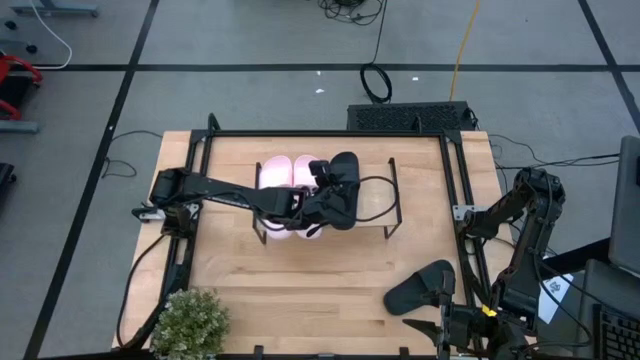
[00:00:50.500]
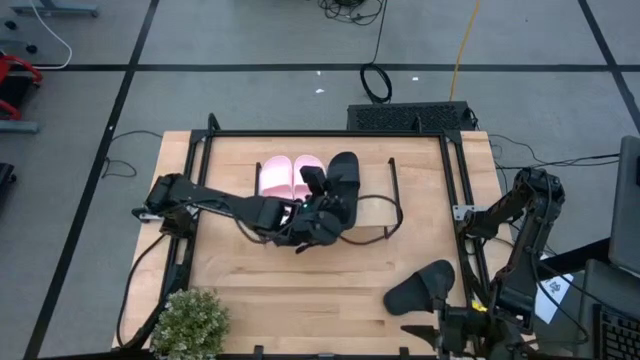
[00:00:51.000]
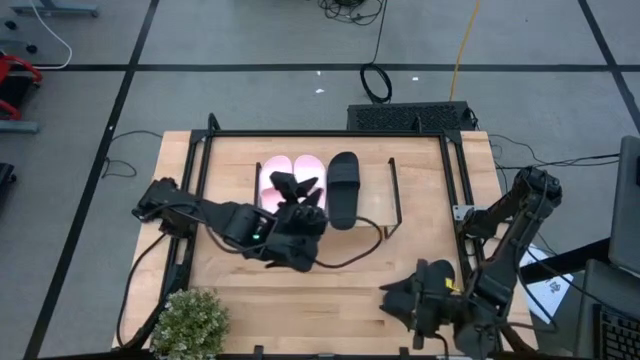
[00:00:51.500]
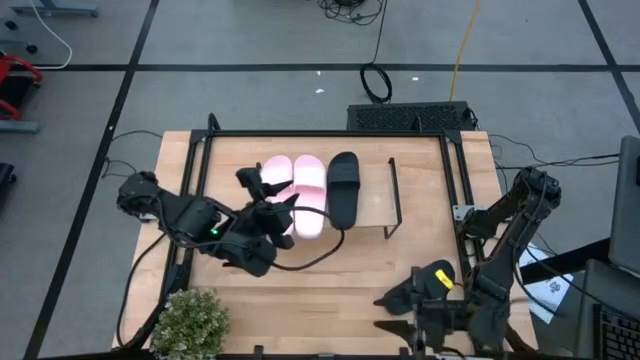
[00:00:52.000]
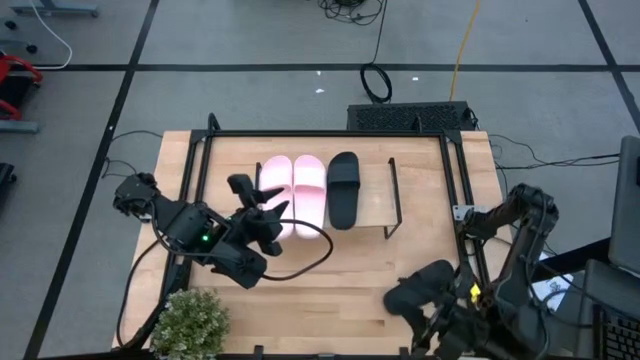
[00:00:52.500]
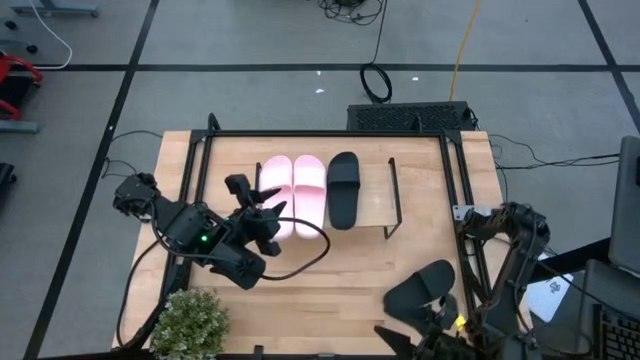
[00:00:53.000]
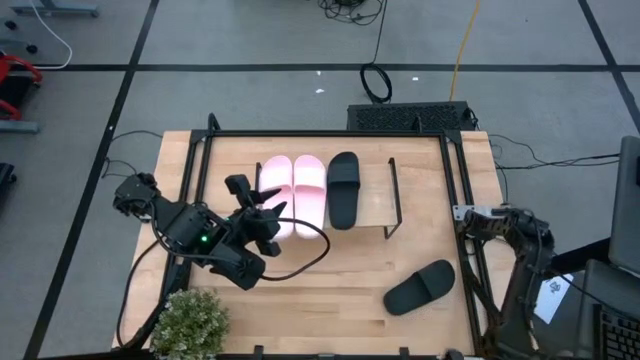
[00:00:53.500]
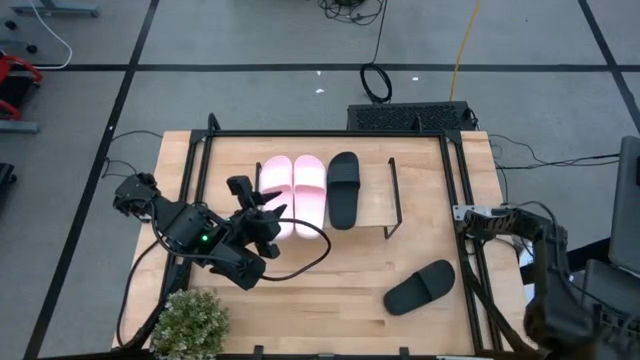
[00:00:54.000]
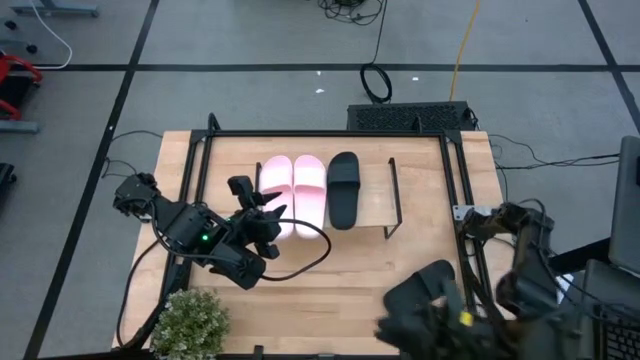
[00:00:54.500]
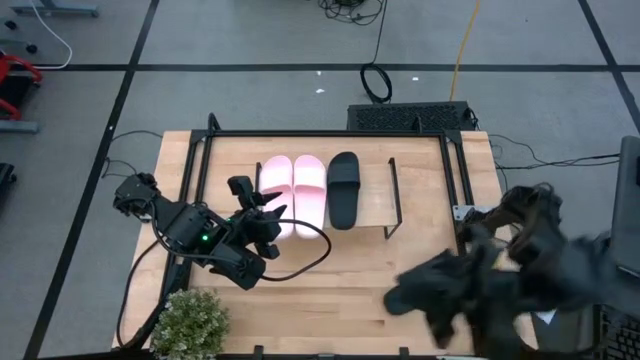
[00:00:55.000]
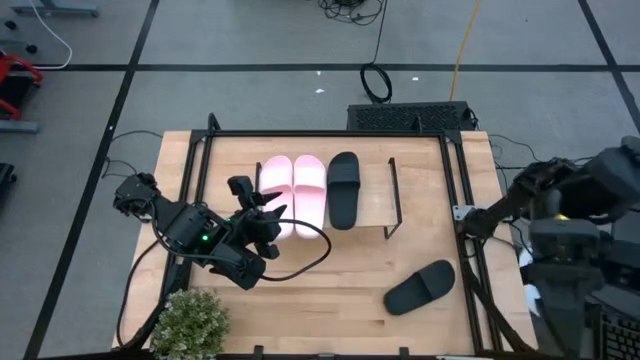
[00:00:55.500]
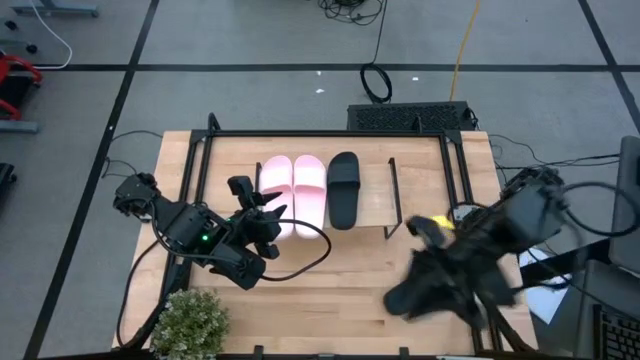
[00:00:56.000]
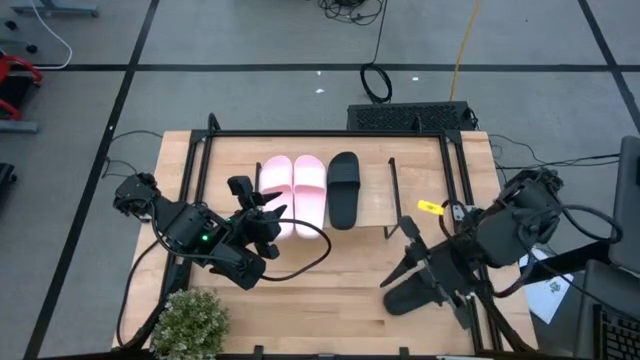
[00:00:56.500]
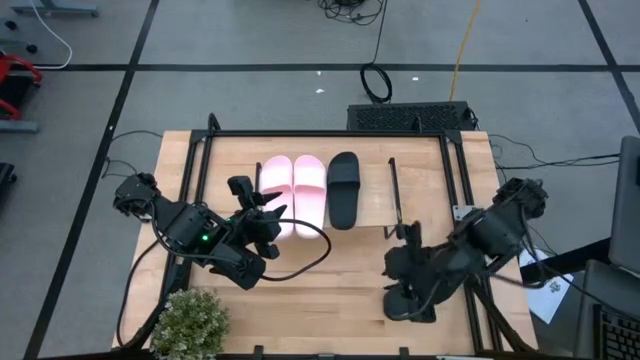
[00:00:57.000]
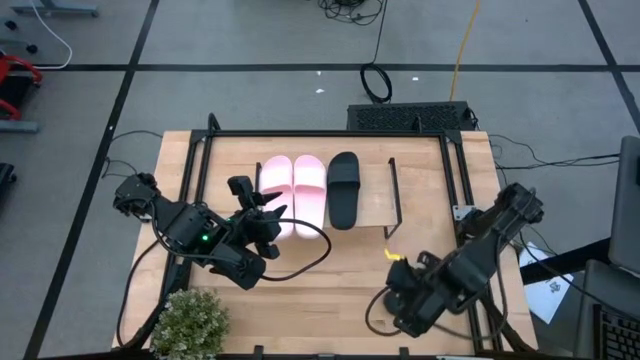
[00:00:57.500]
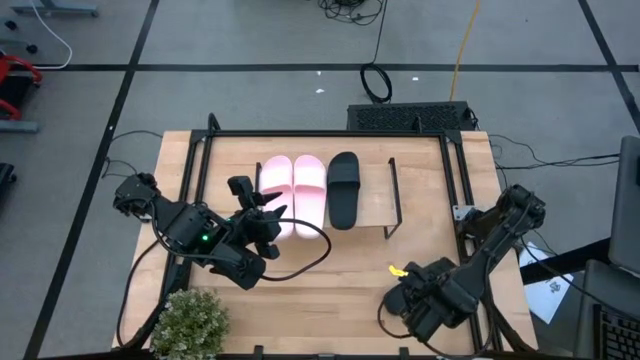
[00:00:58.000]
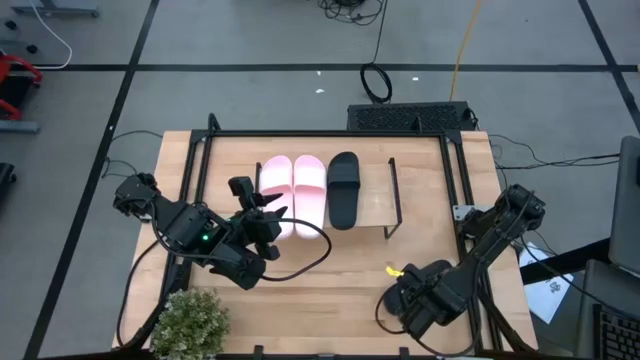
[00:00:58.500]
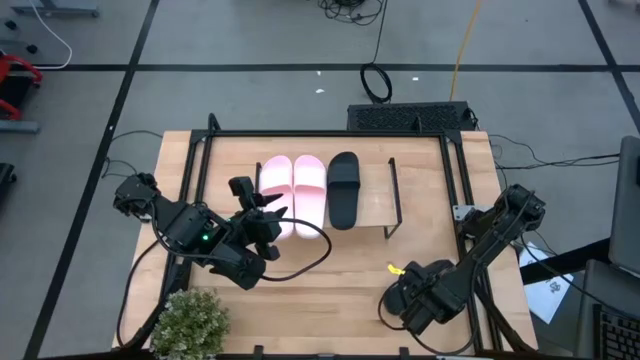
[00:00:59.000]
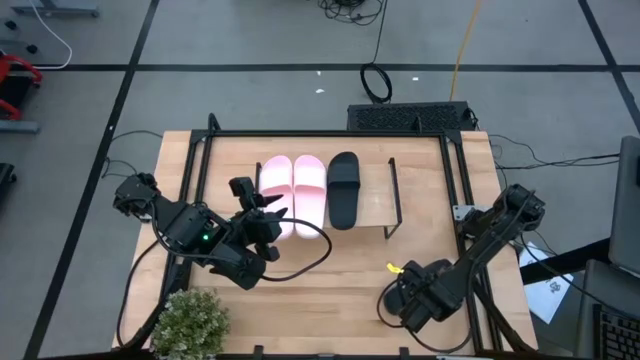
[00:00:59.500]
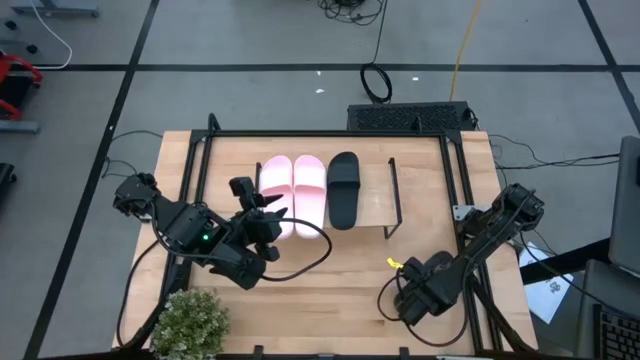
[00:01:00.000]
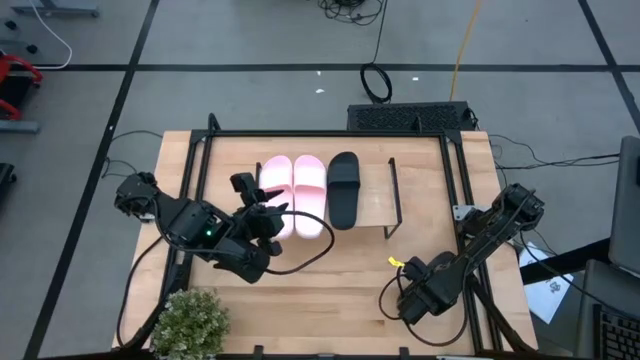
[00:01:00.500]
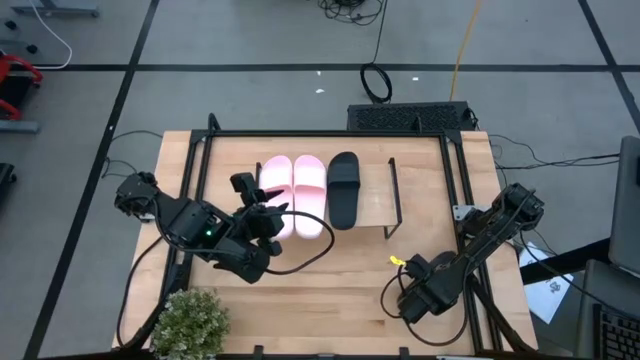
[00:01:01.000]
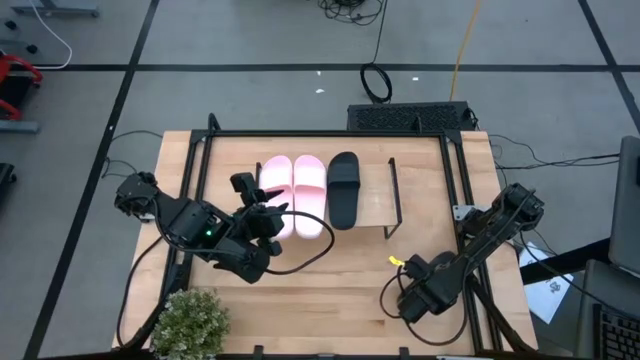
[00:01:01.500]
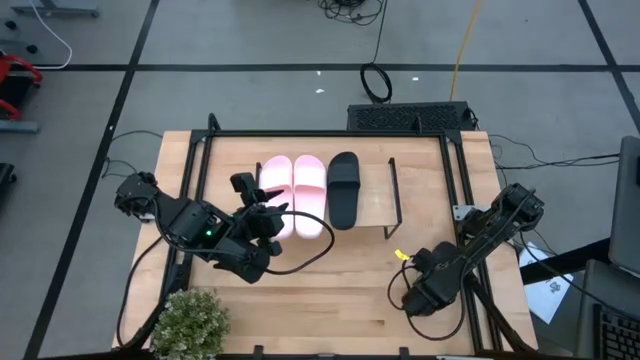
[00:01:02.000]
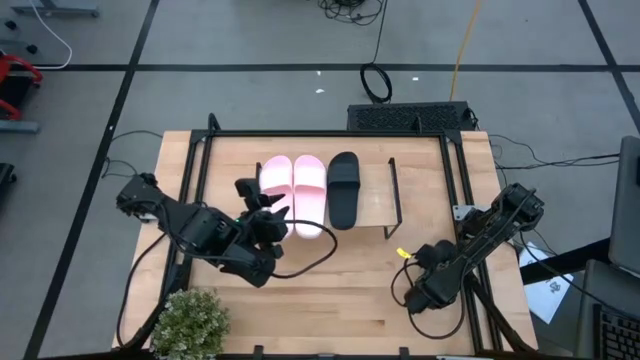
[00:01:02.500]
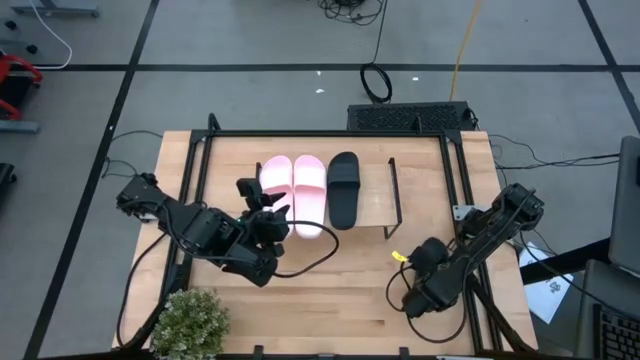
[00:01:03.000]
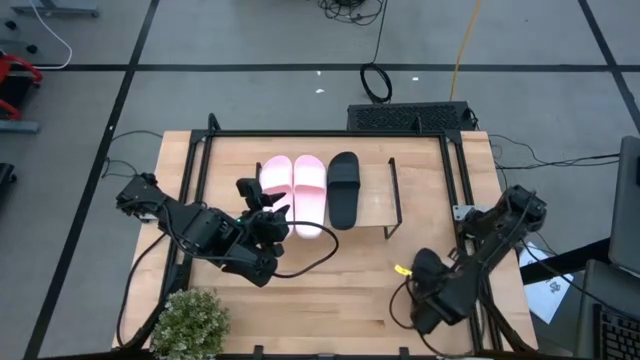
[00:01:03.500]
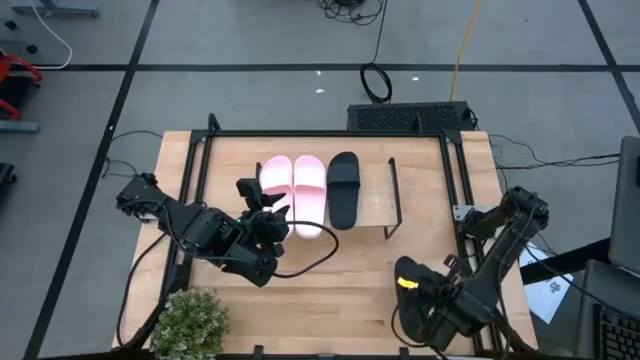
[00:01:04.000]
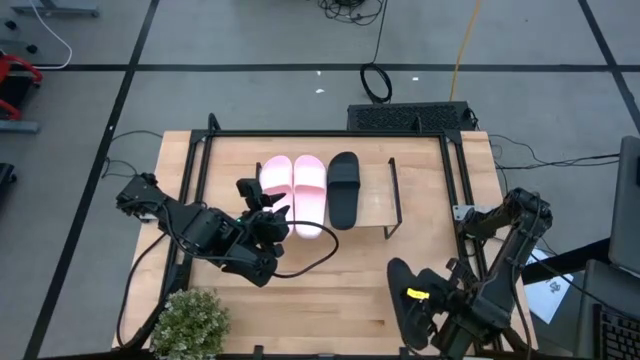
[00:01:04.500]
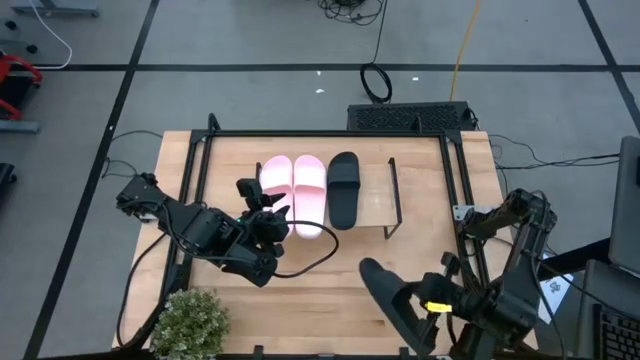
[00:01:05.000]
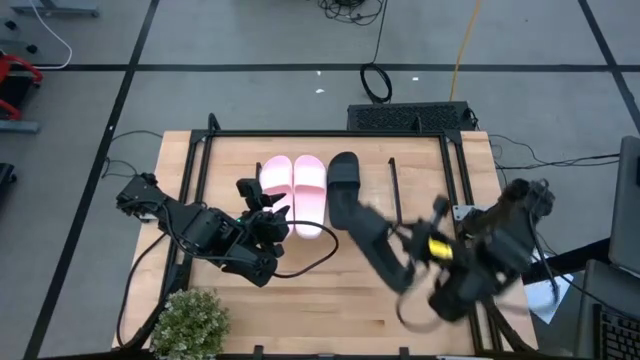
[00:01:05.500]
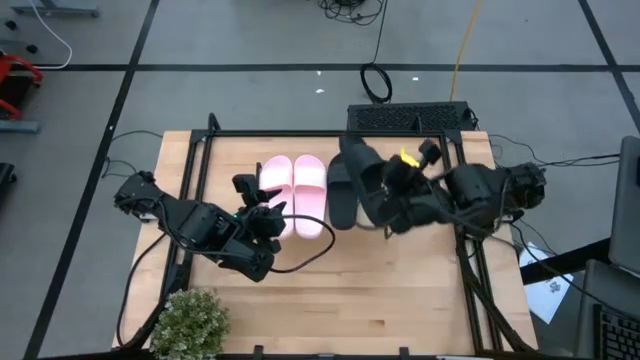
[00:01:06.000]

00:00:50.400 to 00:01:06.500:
Task: Pick and place slides into the shelf
Put the black slipper on the shelf
